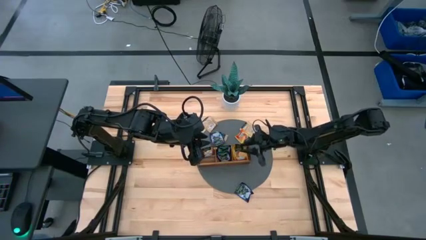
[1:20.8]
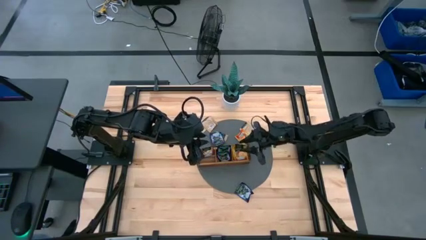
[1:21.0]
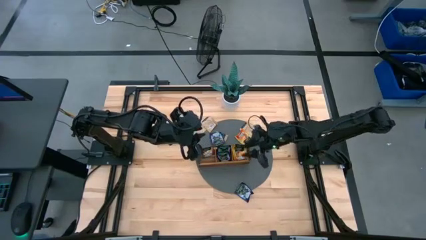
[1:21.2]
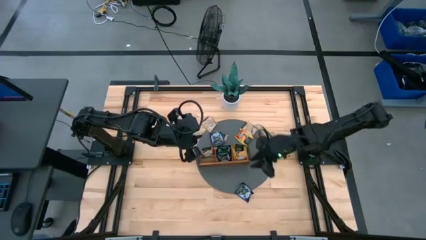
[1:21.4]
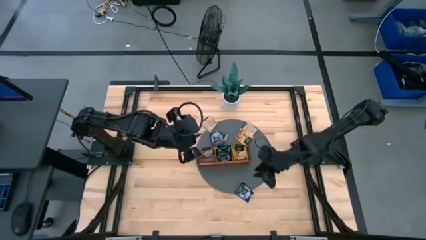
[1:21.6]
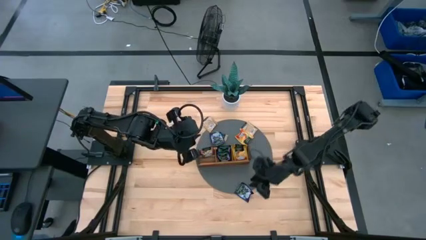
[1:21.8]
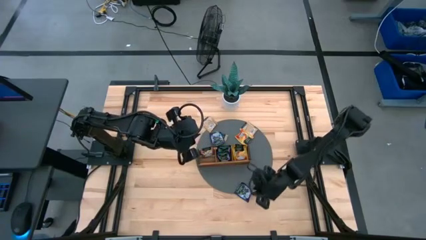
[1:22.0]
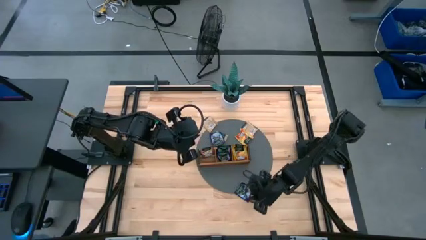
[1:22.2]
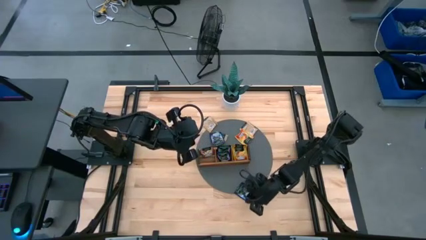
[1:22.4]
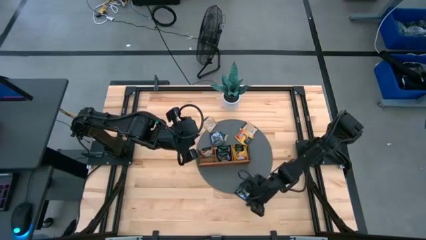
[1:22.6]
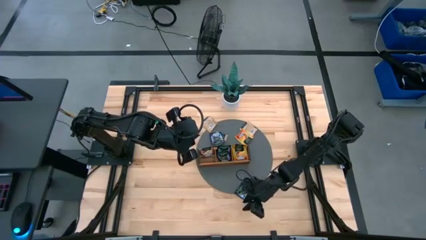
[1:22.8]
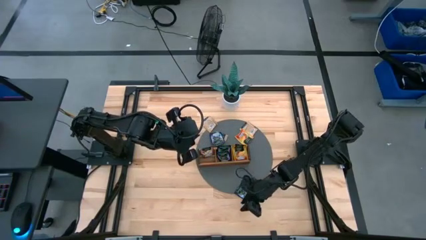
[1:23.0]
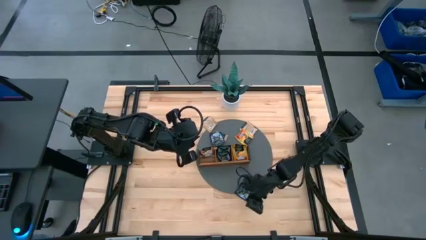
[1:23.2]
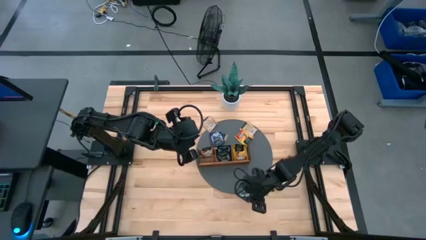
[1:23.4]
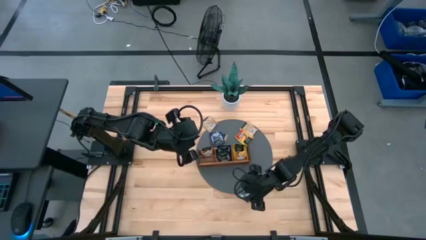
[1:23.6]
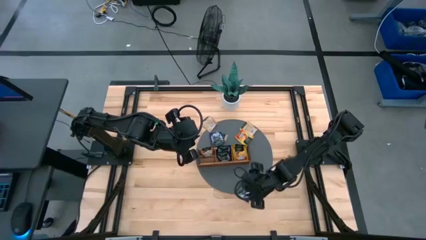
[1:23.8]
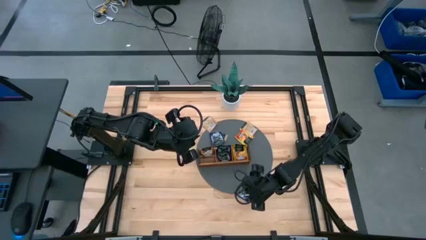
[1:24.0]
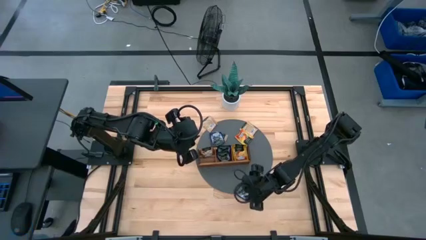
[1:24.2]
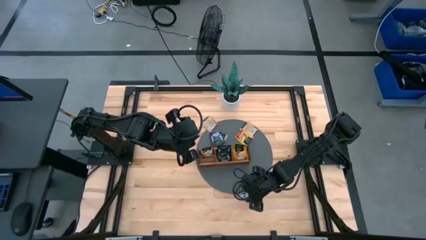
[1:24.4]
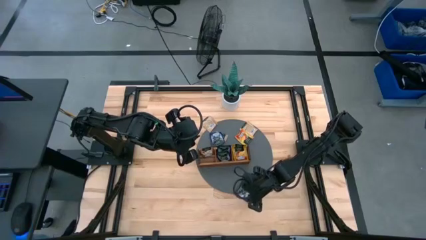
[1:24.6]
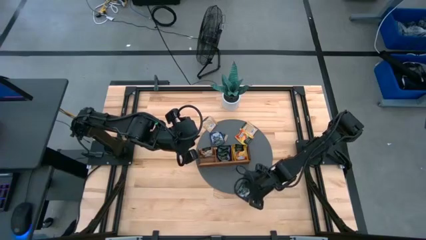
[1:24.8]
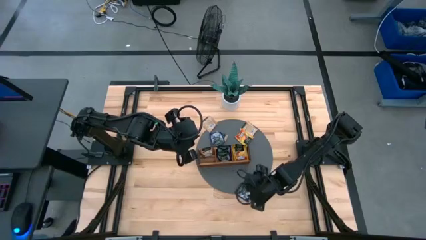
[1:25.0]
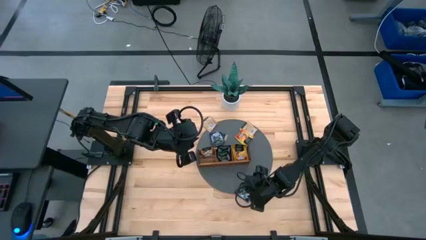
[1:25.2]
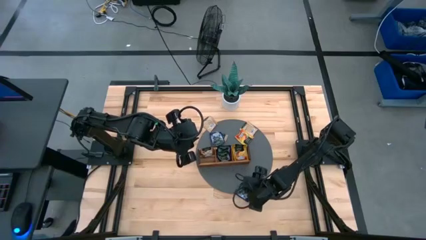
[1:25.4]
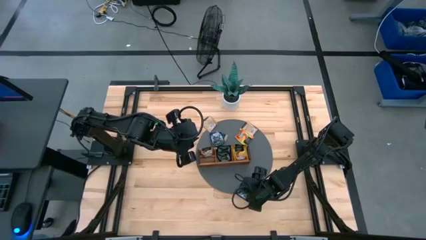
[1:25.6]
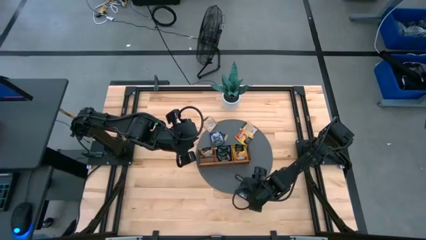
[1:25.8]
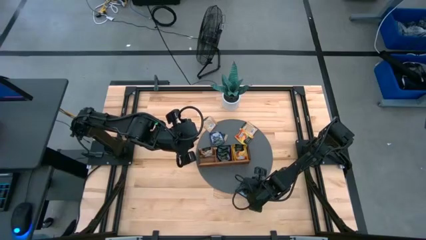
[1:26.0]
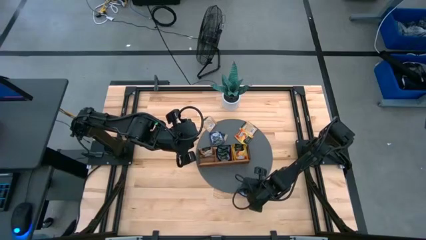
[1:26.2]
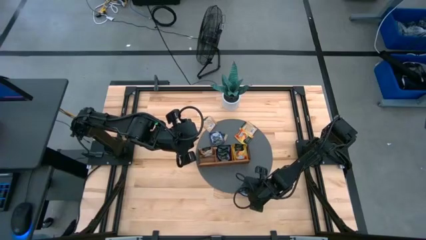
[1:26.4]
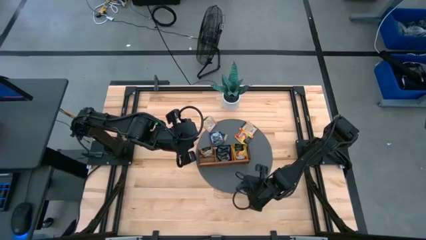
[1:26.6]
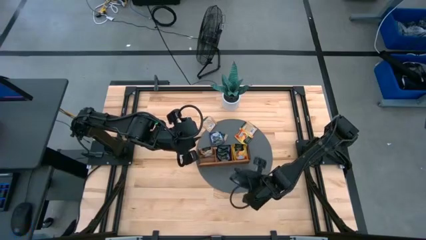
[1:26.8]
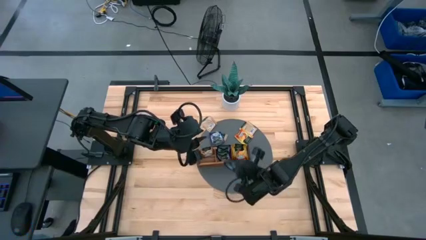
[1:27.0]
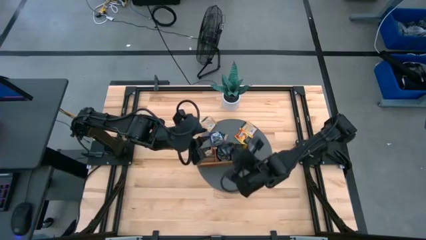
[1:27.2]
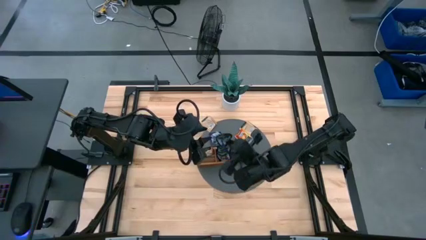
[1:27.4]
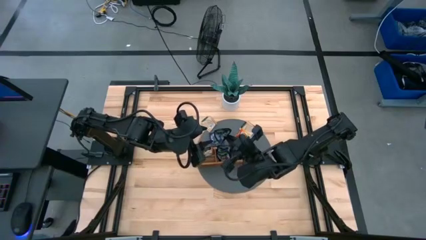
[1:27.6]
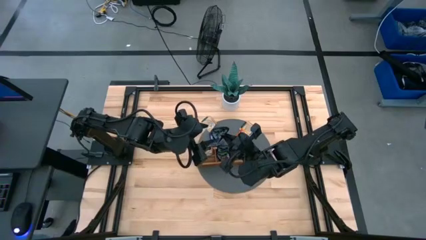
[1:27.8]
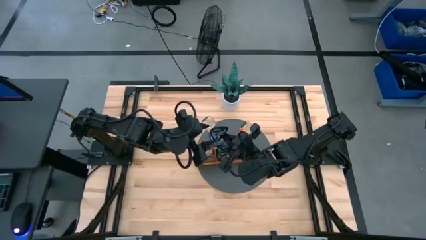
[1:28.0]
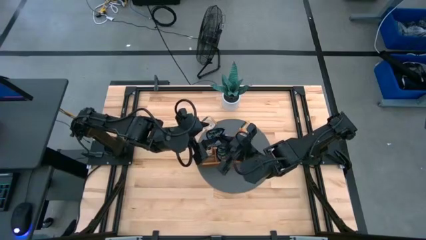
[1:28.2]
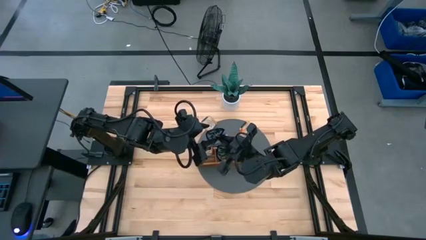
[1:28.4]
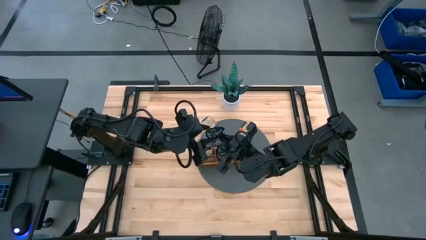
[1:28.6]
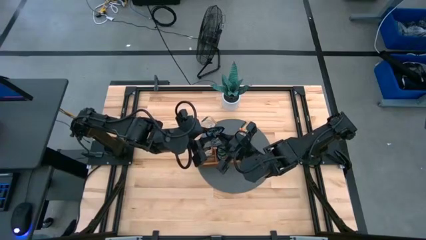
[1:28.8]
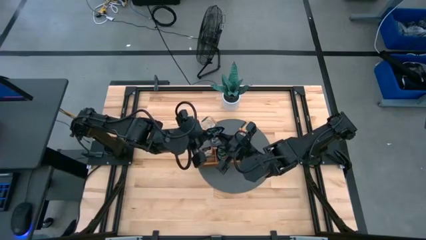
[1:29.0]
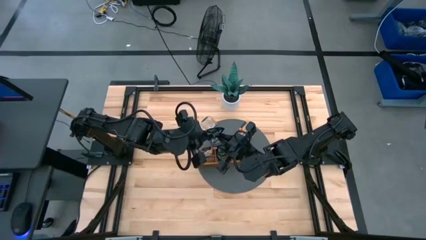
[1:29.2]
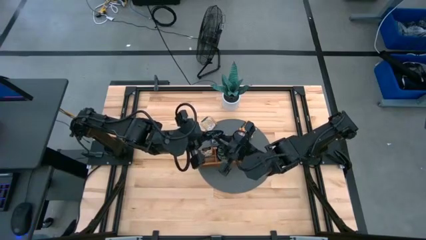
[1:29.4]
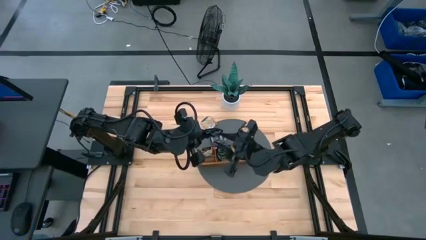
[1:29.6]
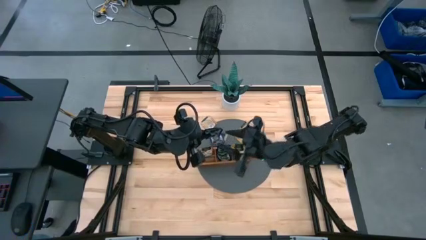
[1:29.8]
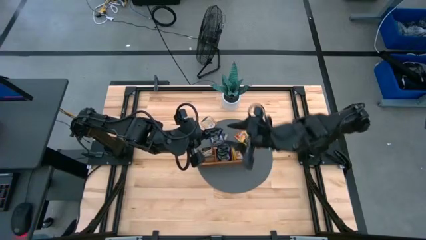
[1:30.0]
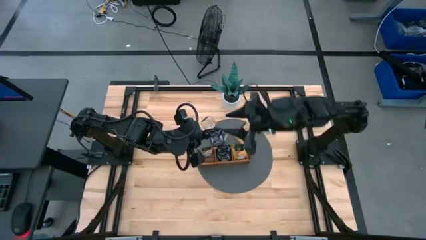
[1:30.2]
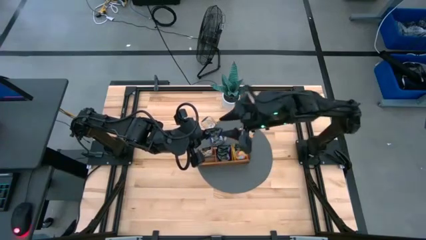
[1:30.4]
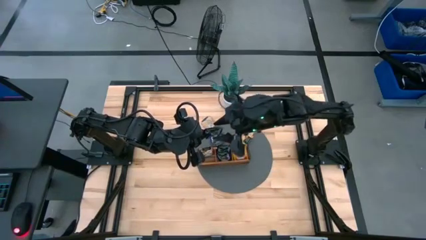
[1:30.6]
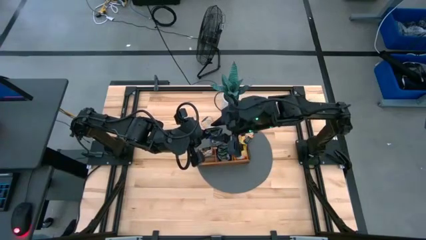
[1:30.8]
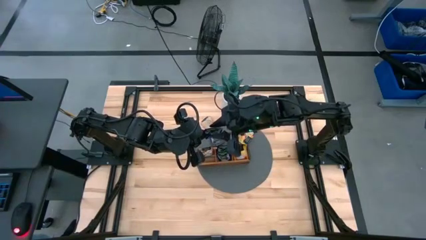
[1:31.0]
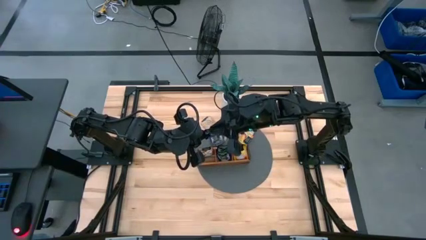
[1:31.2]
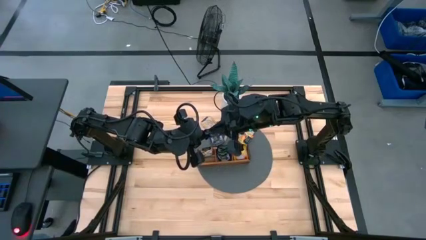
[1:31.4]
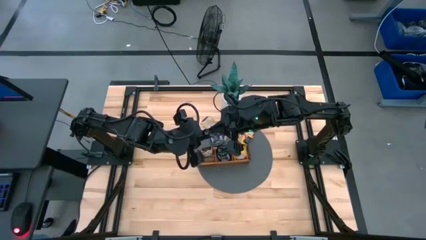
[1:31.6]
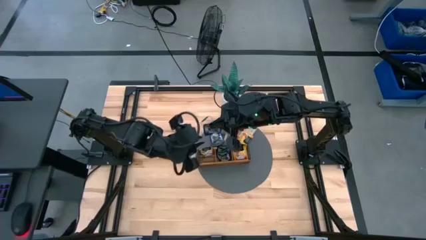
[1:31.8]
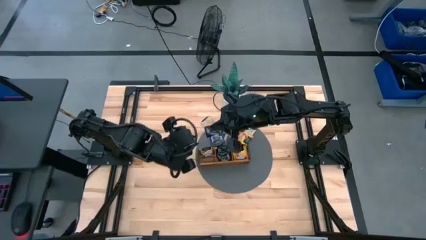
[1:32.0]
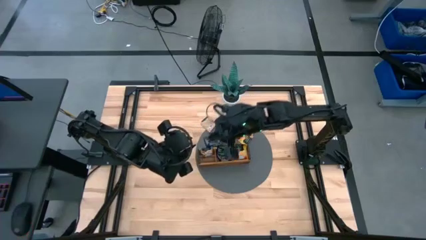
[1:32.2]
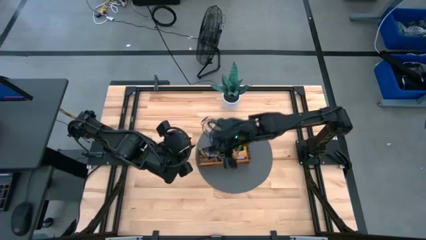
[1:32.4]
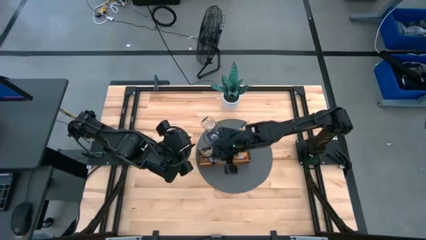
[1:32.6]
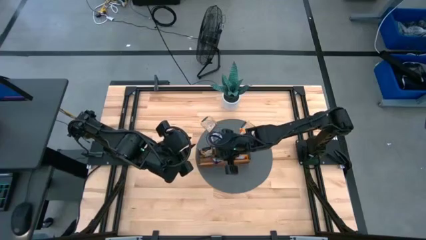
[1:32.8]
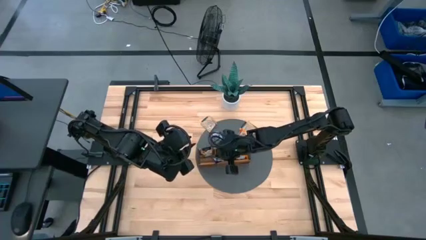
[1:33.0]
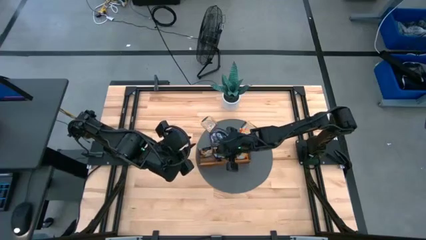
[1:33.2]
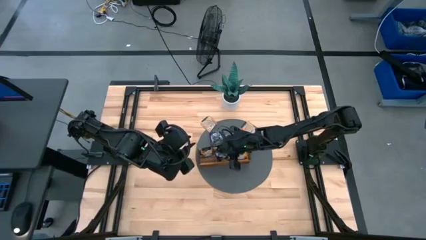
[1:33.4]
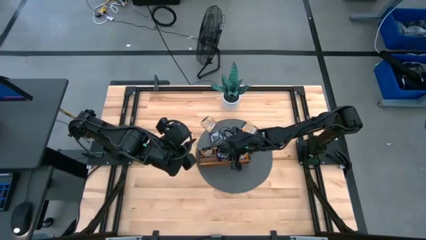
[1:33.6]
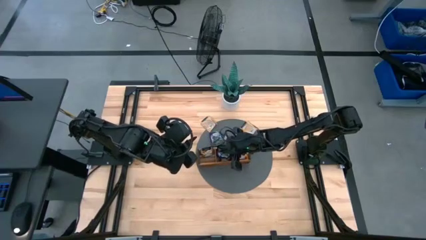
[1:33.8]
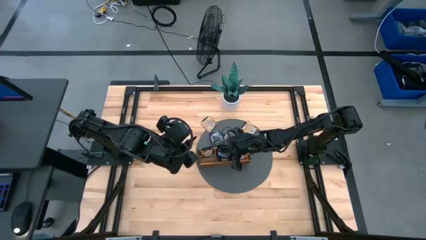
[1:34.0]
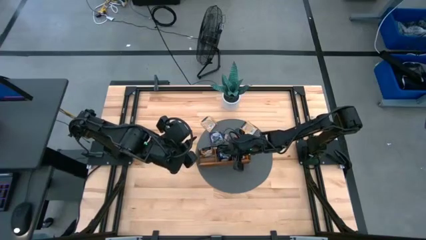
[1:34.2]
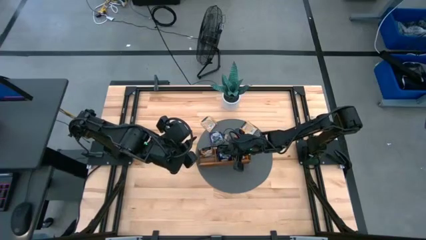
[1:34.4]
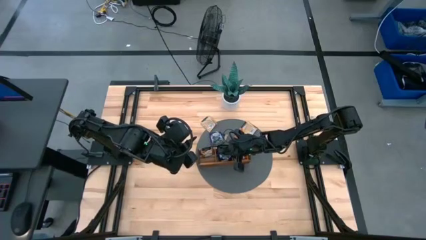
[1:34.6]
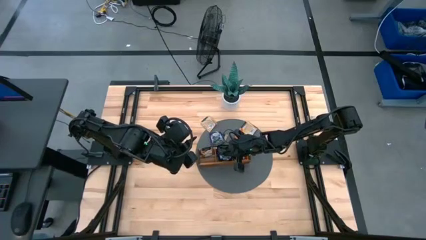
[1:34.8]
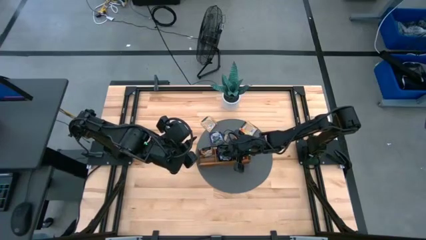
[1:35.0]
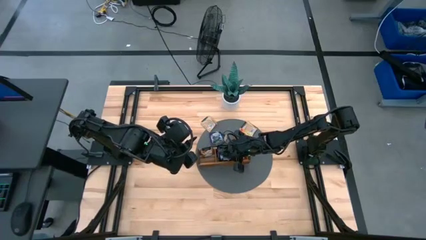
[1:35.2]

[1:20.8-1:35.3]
Task: Pick & Place Tea
Put the black tea bag into the middle section of the wooden organizer
